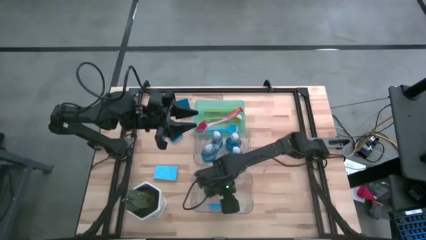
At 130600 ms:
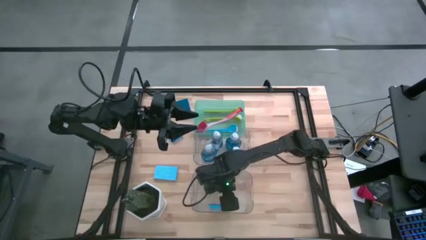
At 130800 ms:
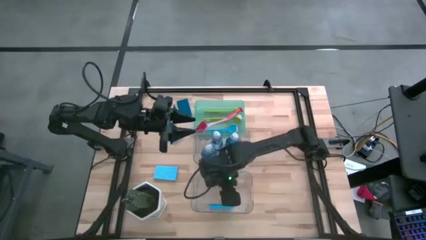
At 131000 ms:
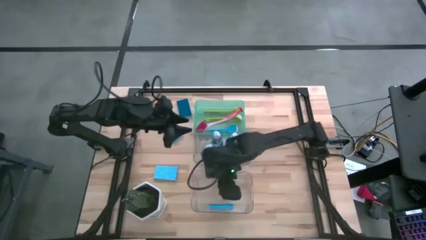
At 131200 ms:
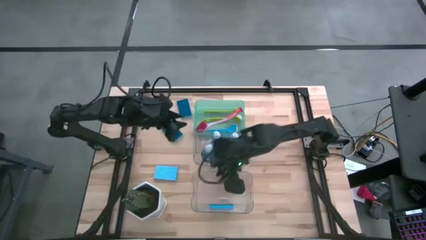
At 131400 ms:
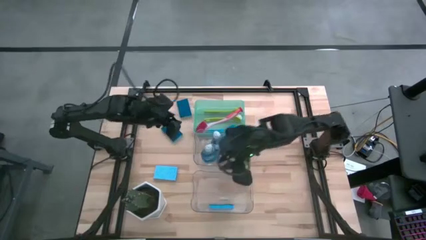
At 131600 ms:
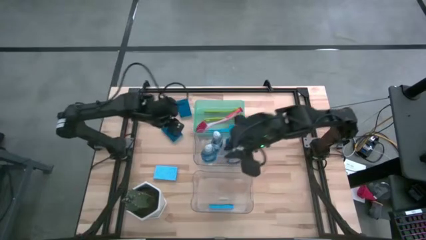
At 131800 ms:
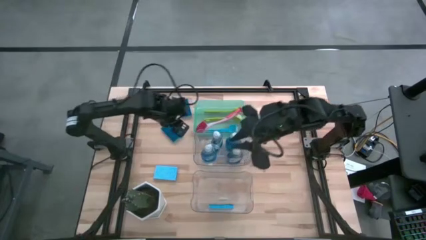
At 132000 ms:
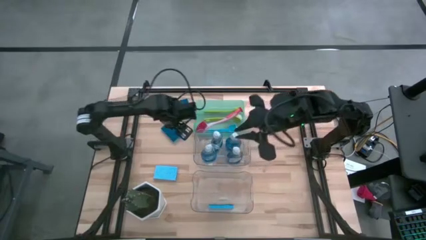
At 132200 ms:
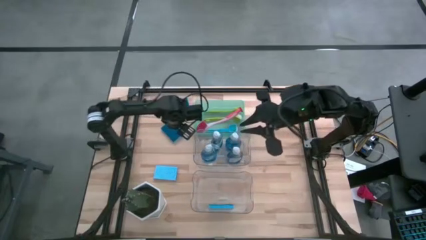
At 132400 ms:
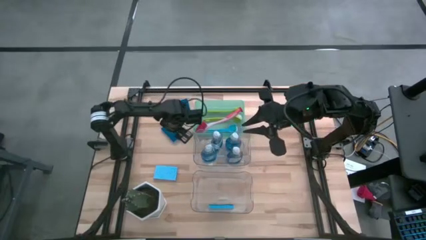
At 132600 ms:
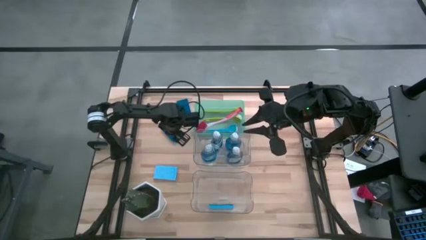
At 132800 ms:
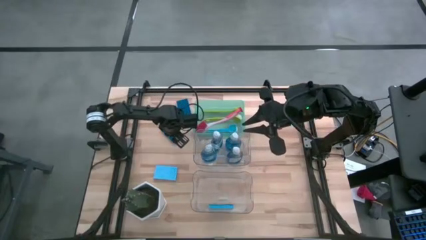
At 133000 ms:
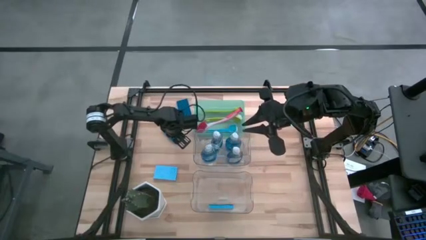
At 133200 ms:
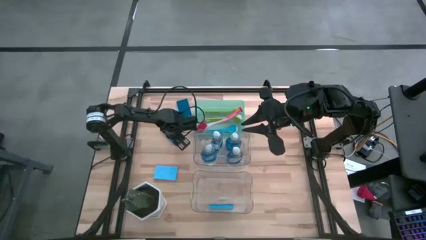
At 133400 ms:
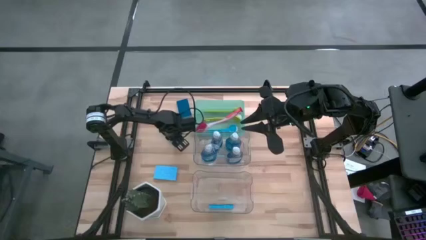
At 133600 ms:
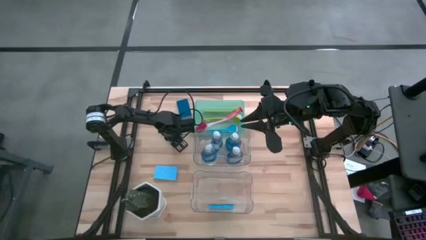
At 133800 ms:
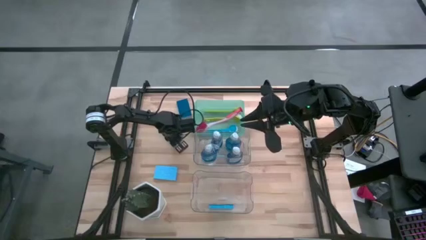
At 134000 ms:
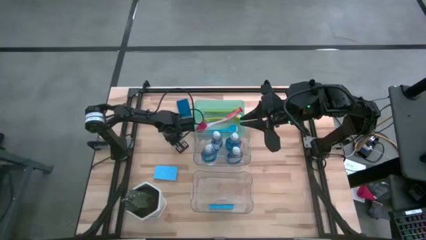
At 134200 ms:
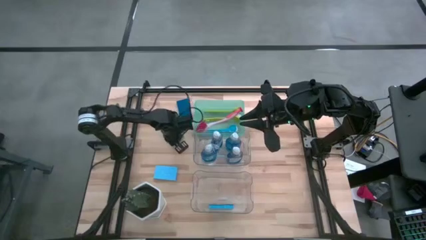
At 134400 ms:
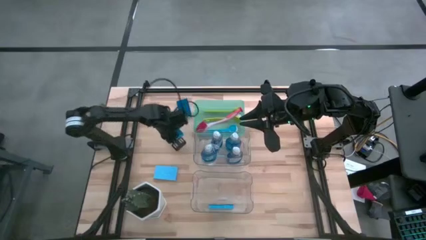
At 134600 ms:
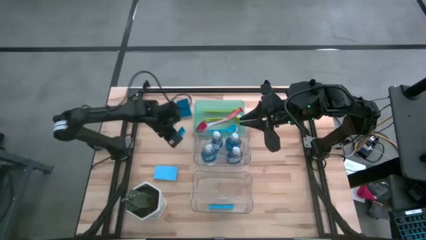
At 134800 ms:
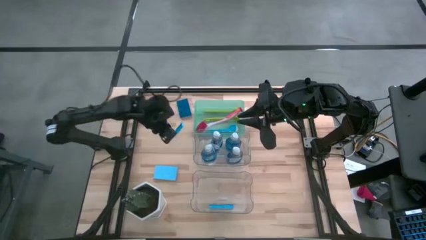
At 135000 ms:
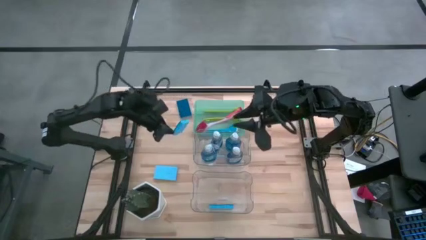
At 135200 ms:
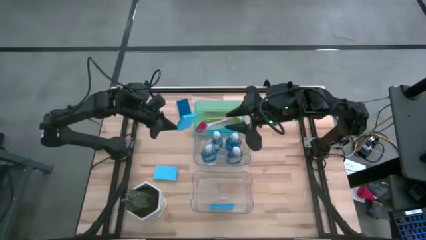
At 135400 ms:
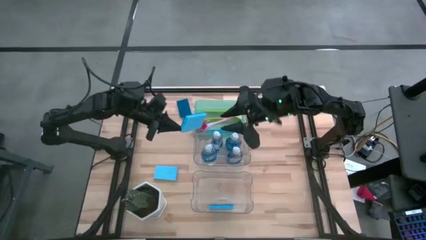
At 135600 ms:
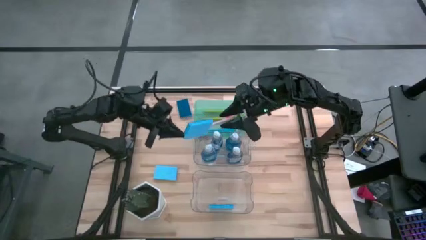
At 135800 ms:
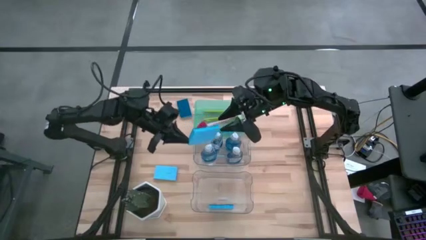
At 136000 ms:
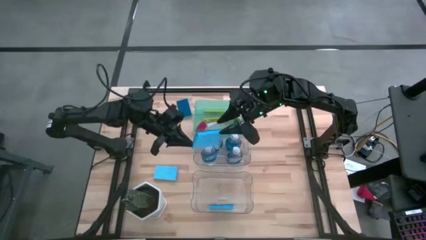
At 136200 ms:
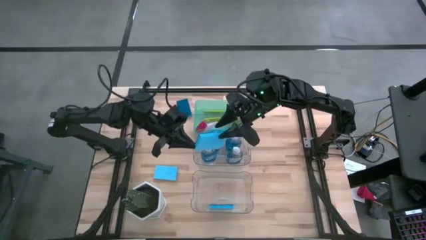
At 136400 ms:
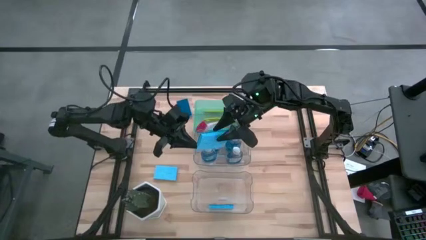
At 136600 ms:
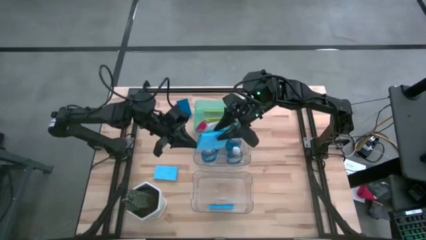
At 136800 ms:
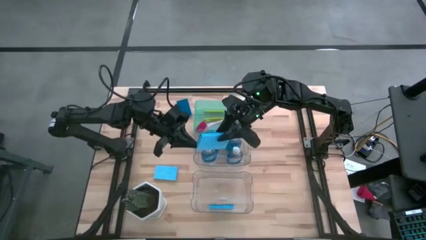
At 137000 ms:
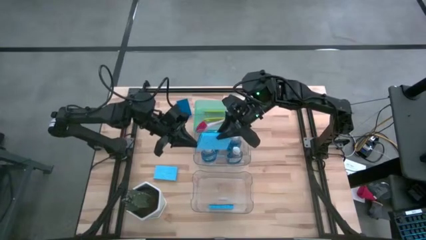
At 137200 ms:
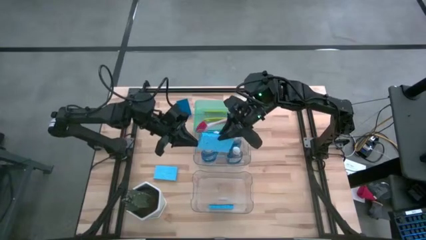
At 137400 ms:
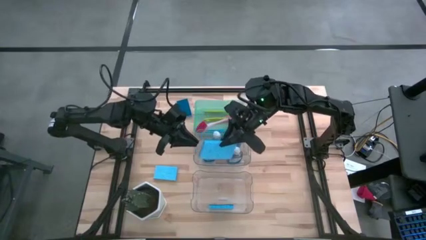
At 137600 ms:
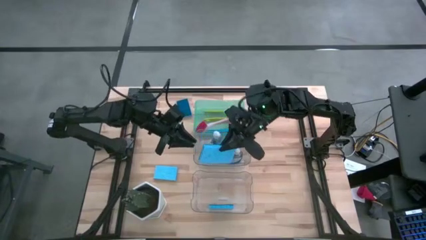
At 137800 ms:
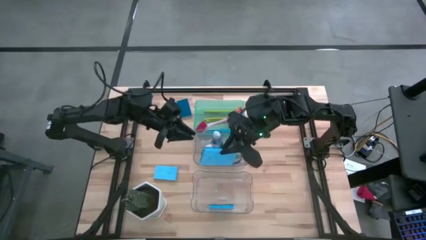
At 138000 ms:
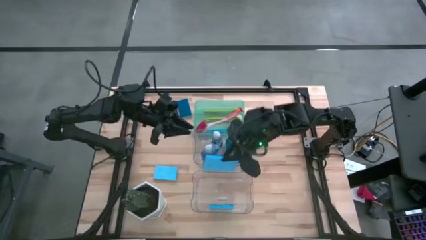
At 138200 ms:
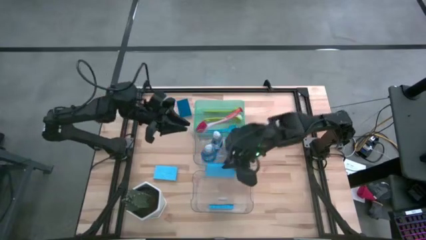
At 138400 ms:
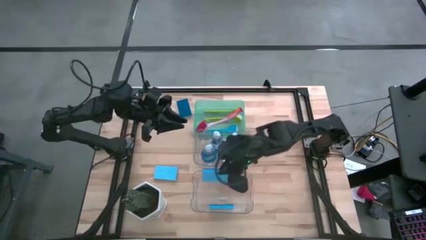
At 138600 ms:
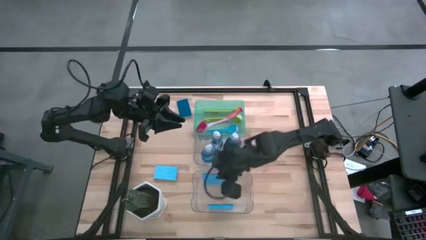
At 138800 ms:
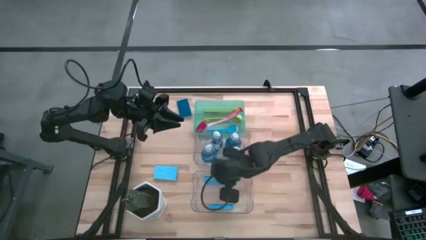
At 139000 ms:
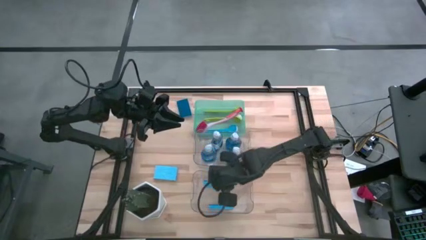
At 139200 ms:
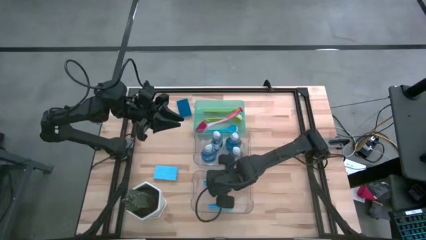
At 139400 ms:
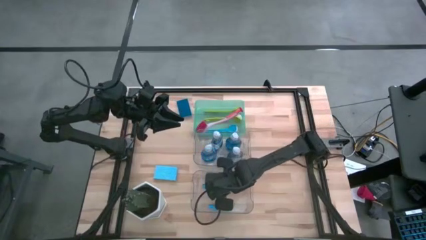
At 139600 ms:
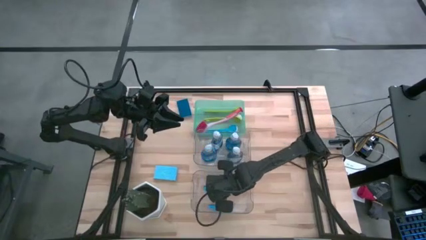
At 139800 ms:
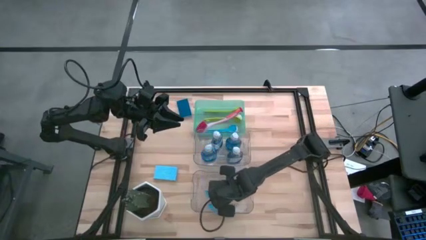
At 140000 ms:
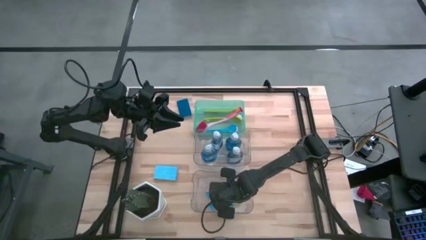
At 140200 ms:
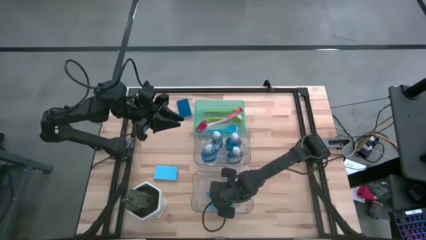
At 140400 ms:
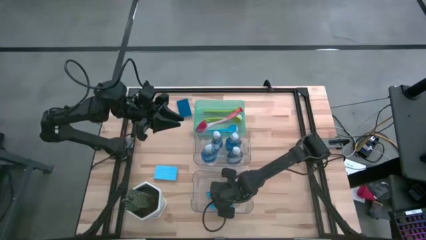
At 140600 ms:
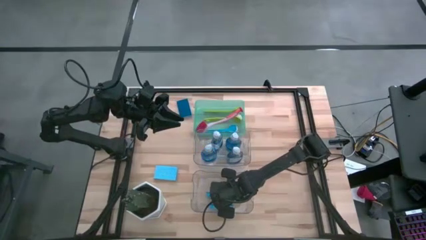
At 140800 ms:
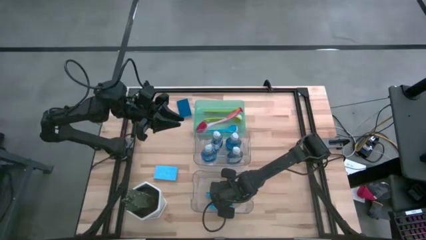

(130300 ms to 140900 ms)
Task: Pick & Place Kitchen Sink Supplies
Put the blue sponge into the bottom transparent bin

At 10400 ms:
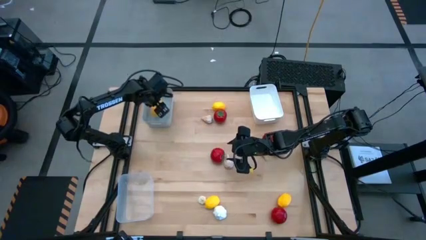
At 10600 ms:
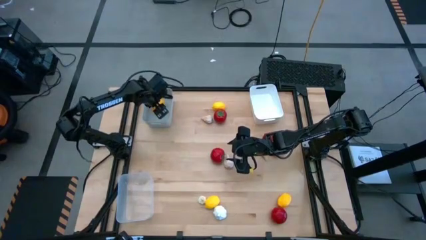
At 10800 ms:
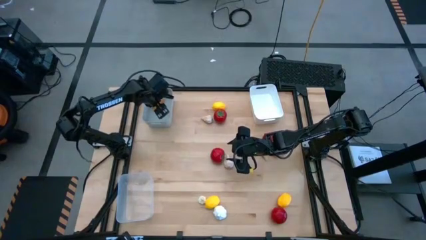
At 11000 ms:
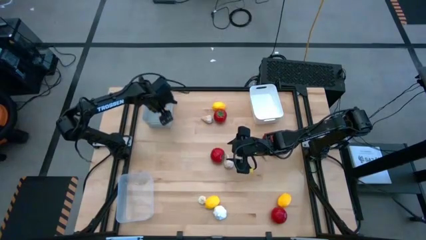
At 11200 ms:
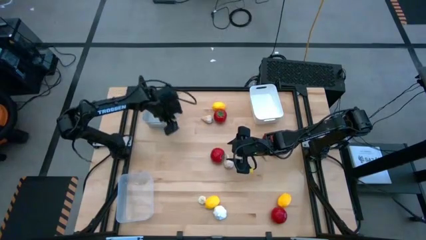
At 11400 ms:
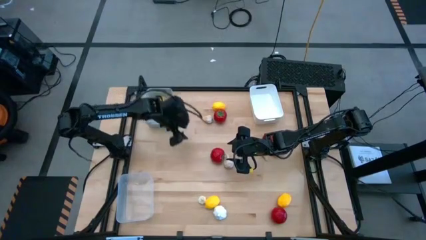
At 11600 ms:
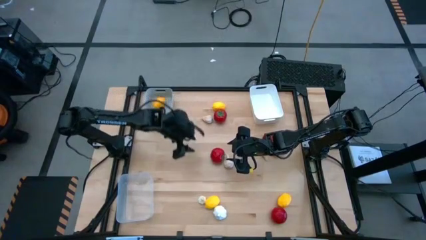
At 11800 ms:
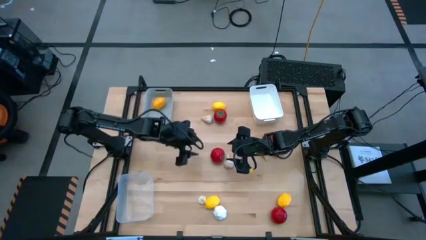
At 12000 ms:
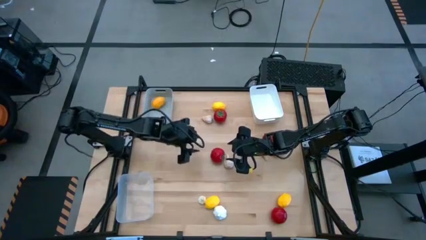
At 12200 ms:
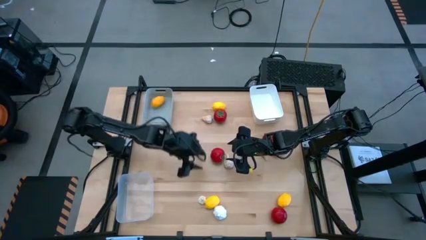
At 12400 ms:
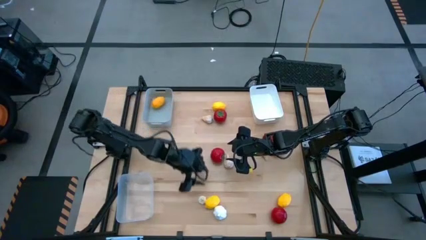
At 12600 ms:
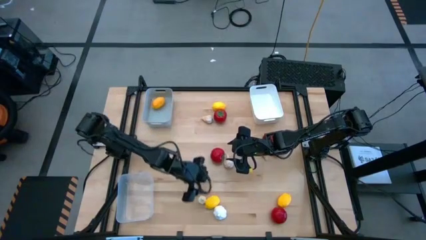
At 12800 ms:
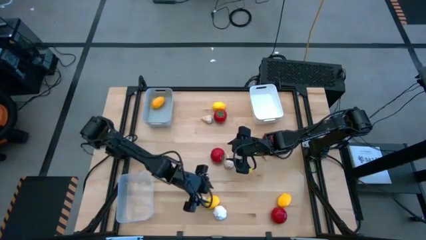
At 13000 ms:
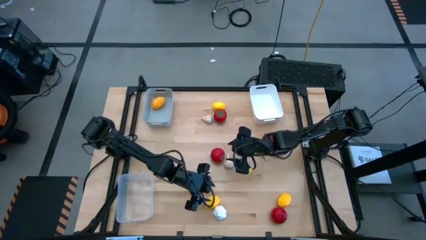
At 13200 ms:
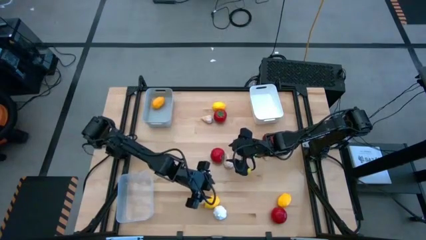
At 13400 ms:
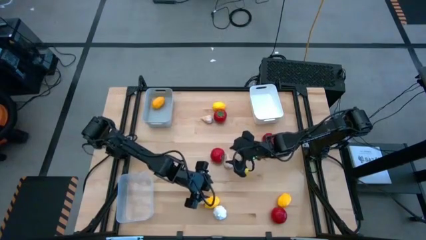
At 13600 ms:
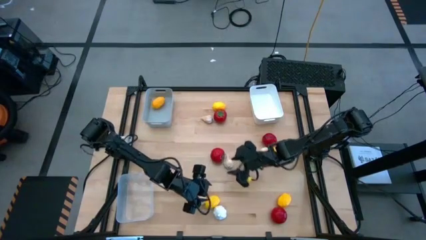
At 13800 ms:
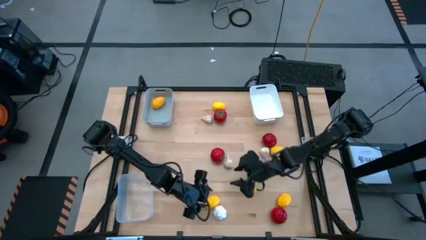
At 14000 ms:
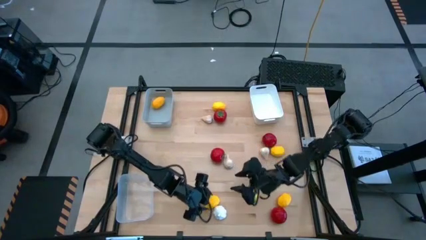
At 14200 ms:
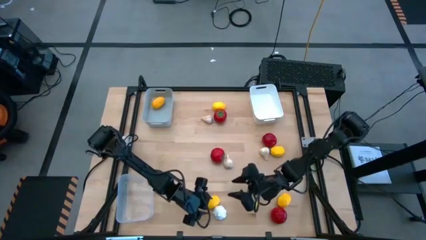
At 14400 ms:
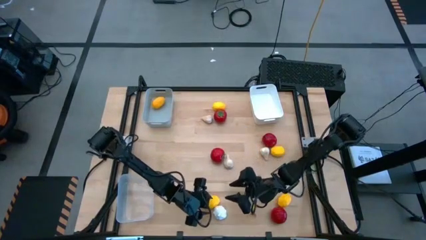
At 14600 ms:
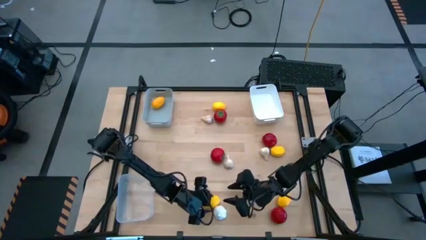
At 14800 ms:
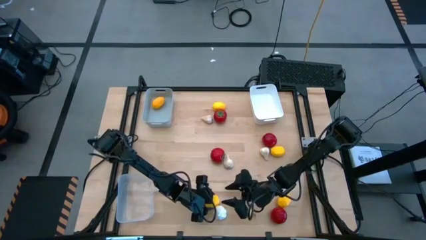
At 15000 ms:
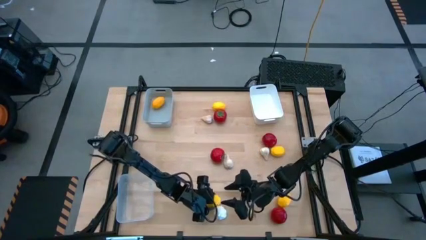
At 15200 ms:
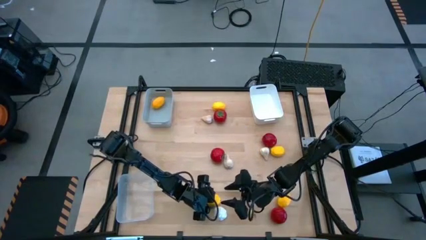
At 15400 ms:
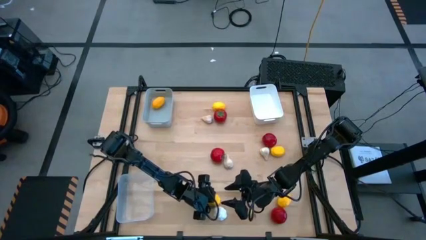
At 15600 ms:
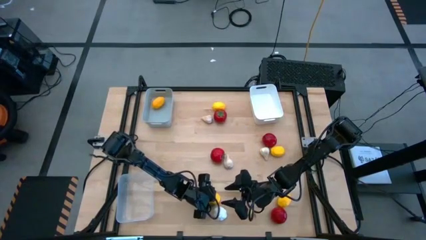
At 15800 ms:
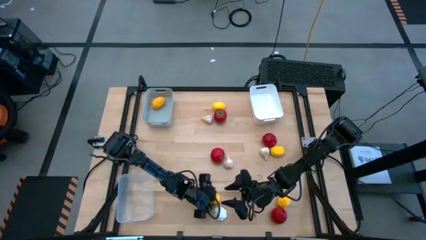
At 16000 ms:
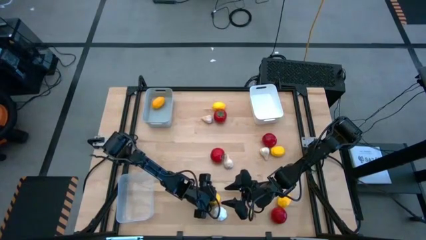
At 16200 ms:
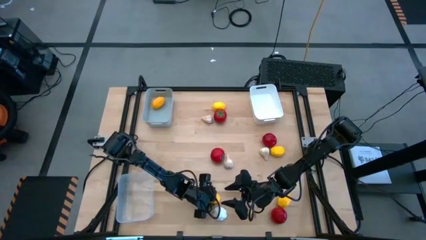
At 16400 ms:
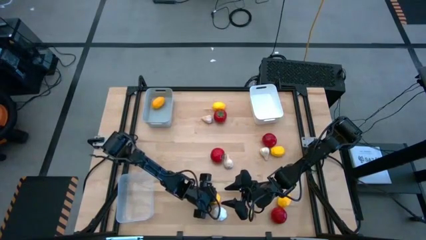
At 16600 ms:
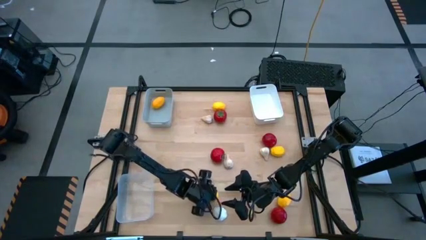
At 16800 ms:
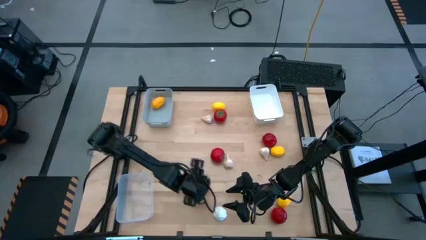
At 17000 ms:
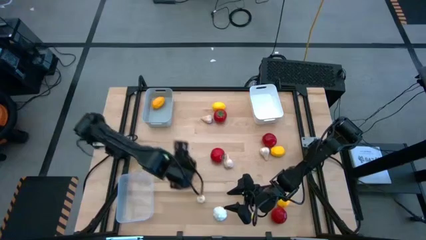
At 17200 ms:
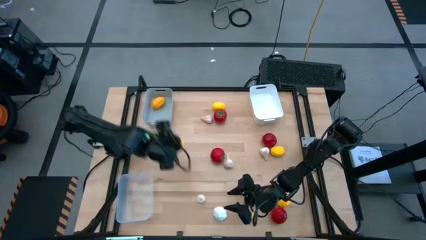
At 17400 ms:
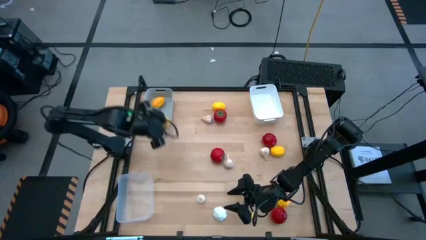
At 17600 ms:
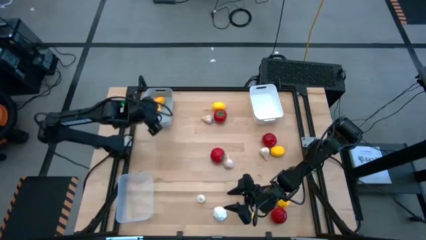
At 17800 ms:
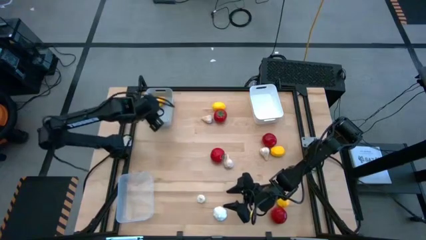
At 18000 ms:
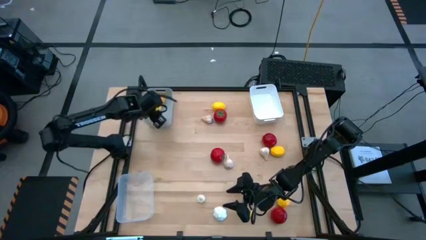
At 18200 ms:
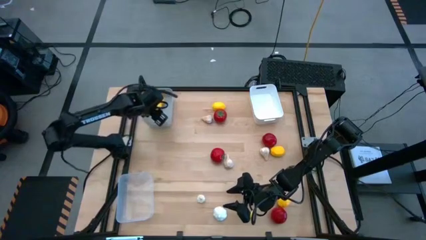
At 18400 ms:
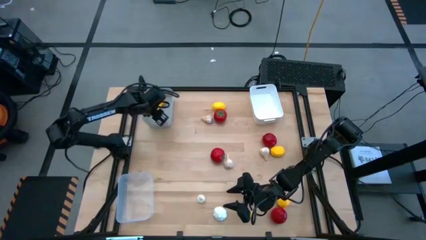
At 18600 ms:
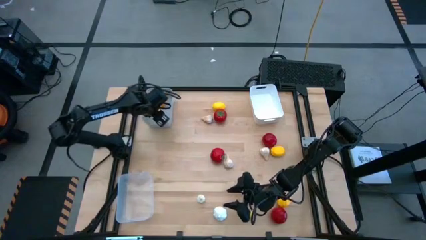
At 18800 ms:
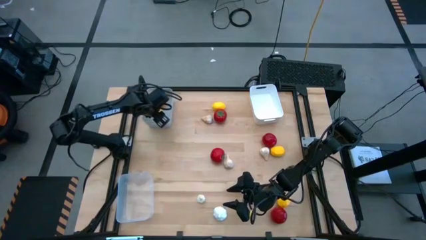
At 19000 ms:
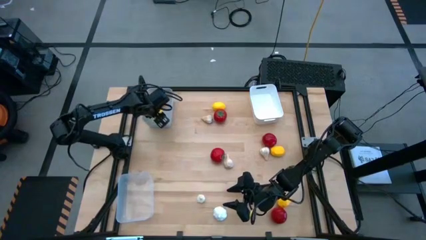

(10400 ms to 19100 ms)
Task: Sort produce into baskets
Put the yellow lemon into the gray bin
